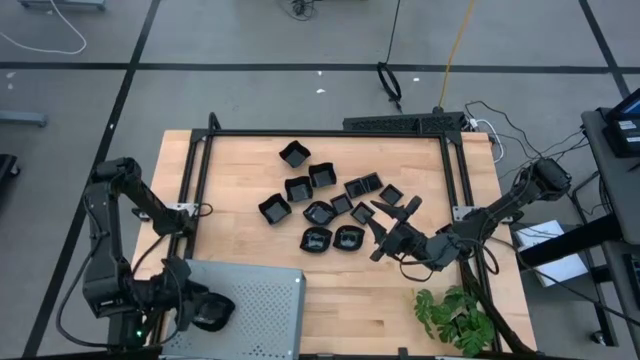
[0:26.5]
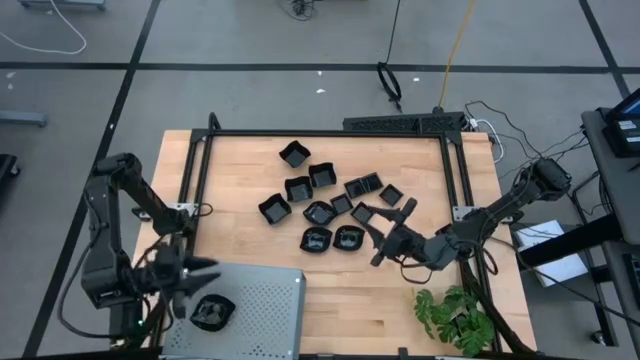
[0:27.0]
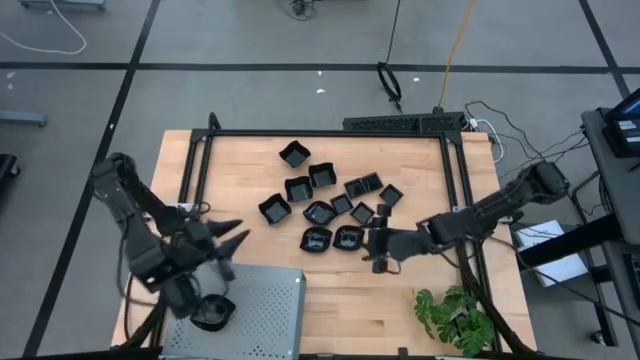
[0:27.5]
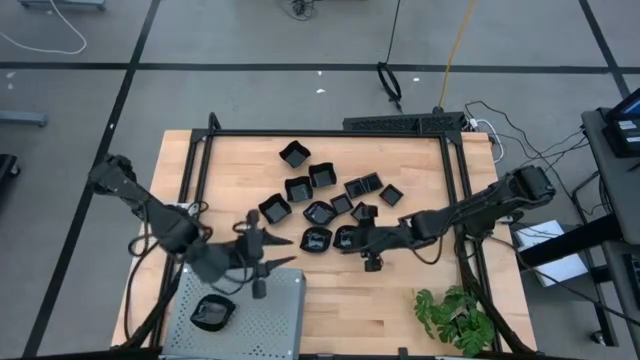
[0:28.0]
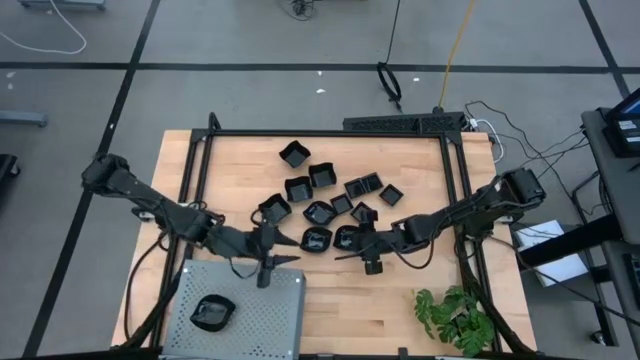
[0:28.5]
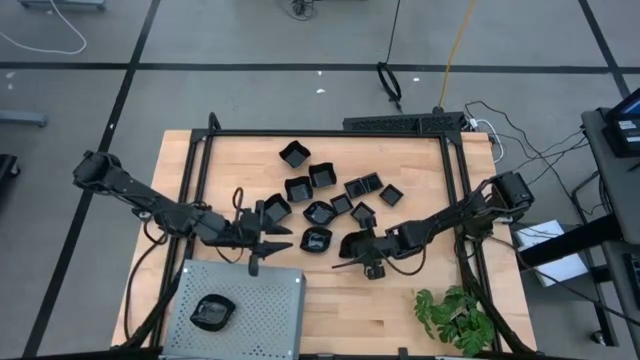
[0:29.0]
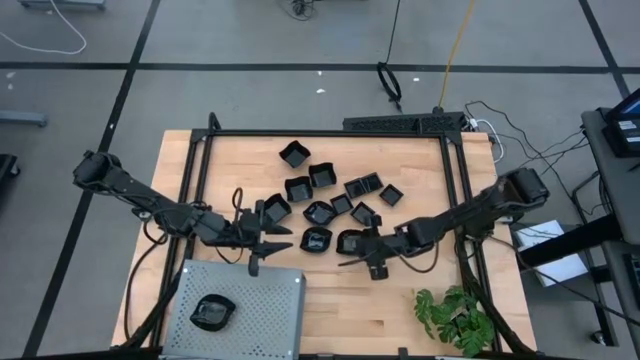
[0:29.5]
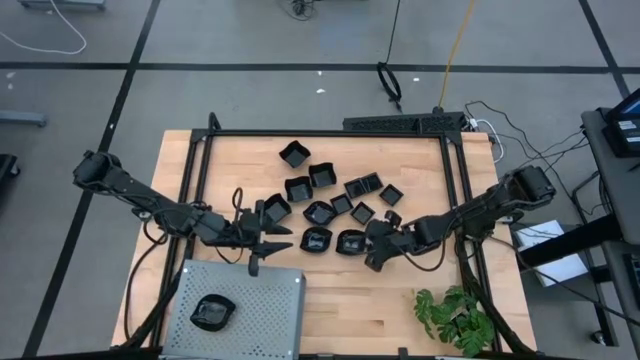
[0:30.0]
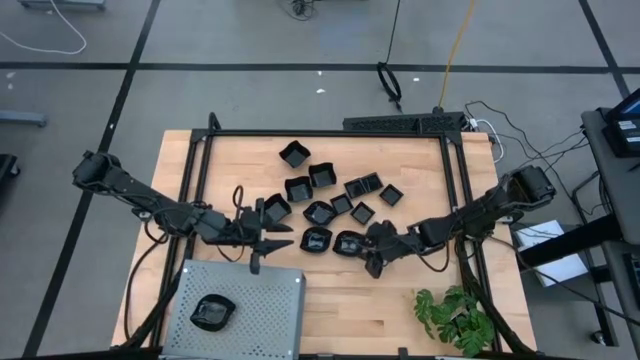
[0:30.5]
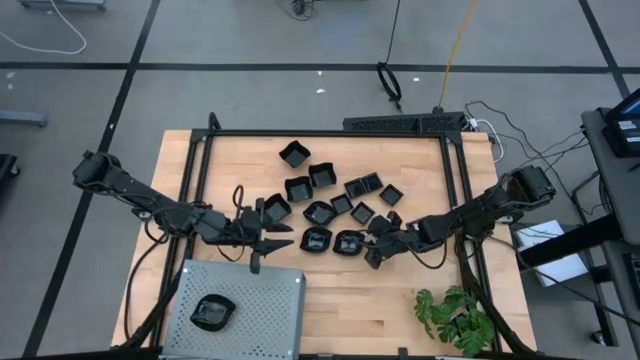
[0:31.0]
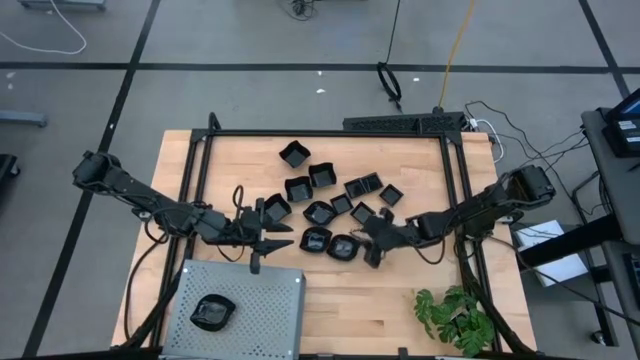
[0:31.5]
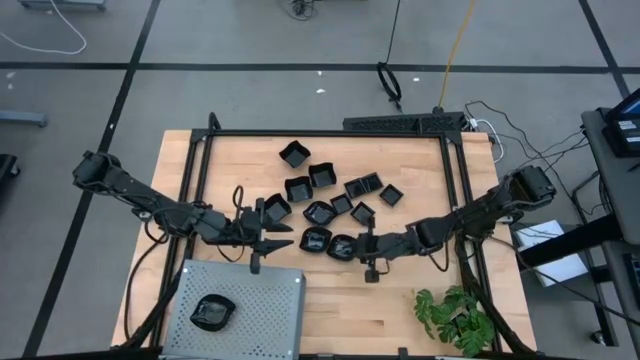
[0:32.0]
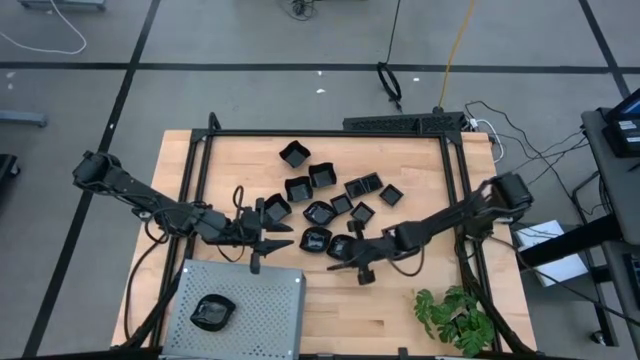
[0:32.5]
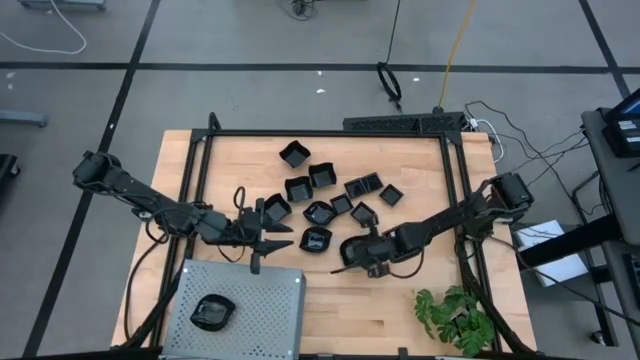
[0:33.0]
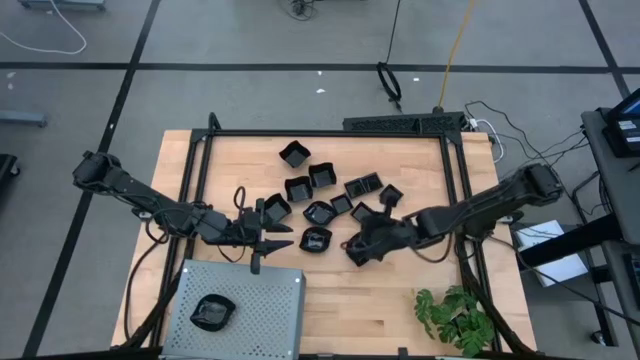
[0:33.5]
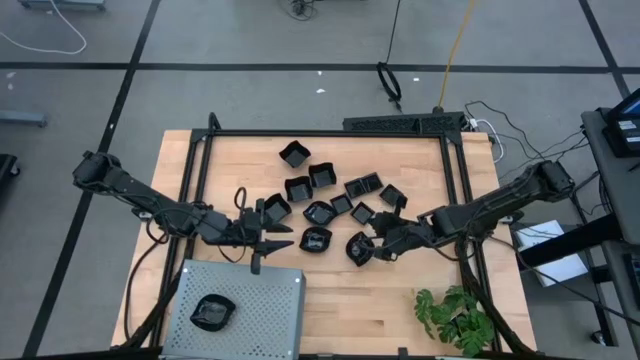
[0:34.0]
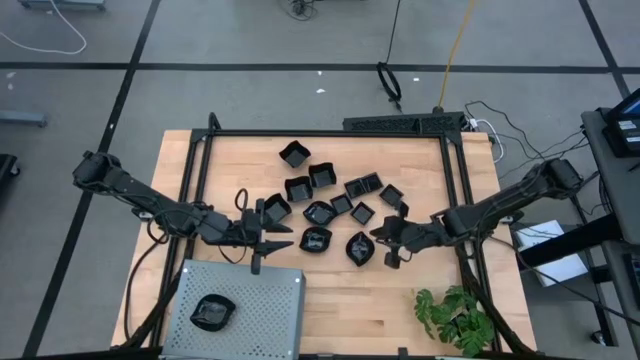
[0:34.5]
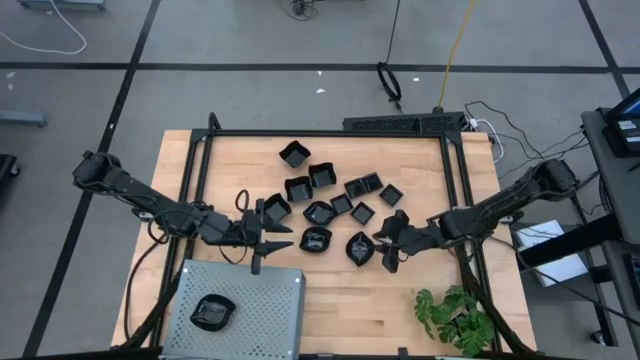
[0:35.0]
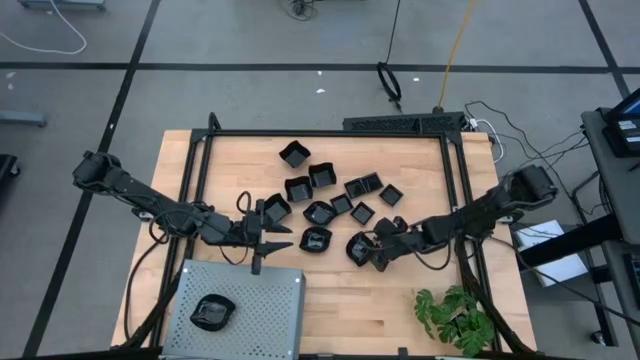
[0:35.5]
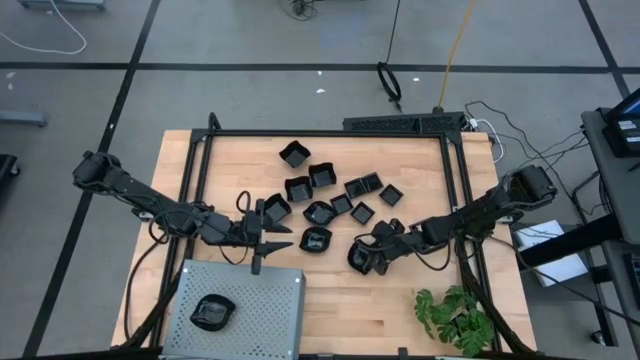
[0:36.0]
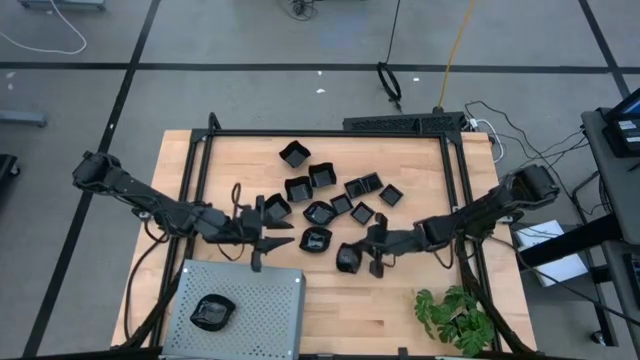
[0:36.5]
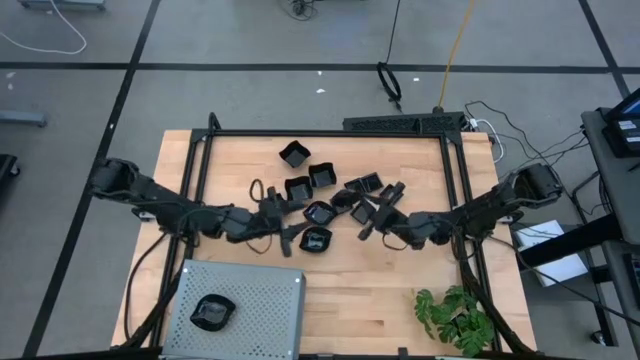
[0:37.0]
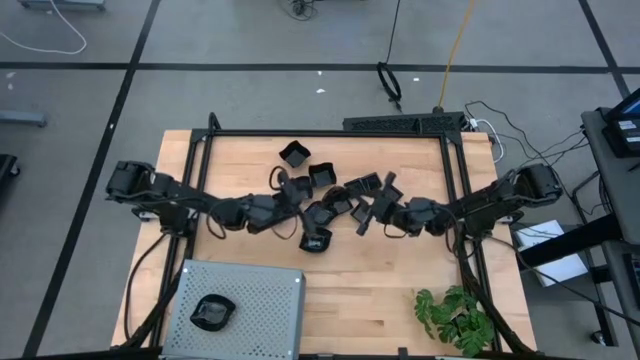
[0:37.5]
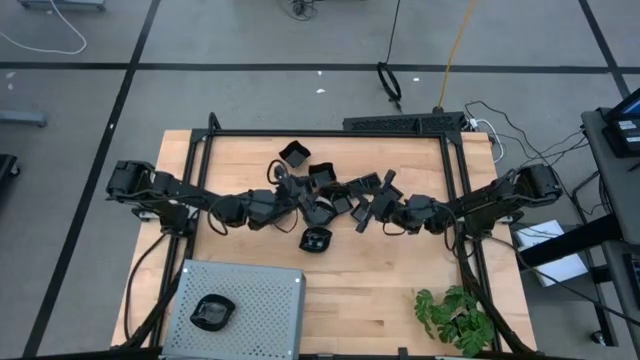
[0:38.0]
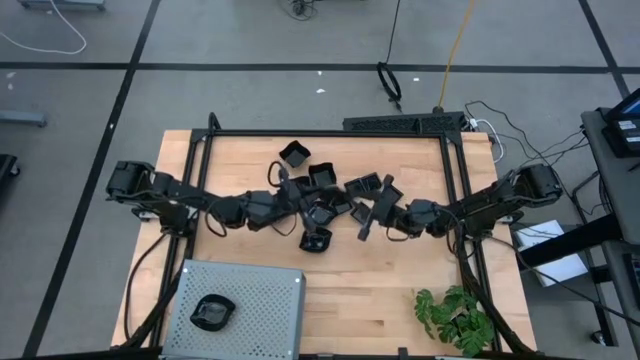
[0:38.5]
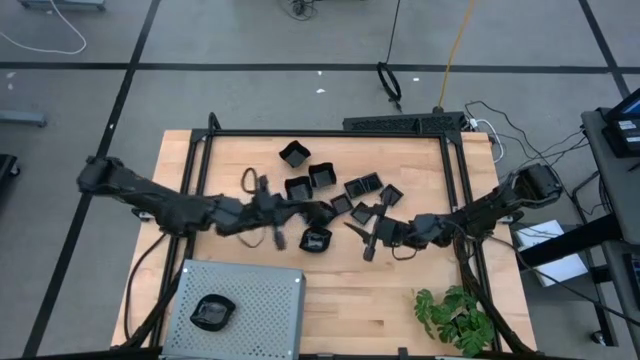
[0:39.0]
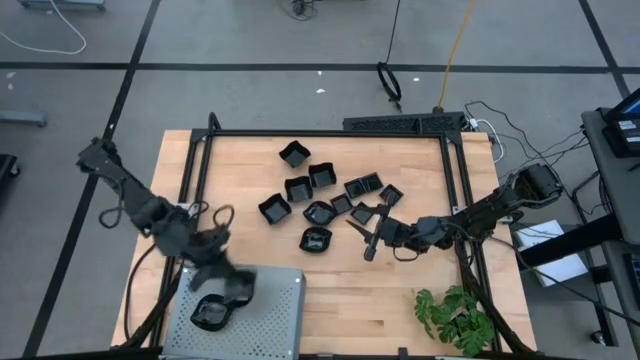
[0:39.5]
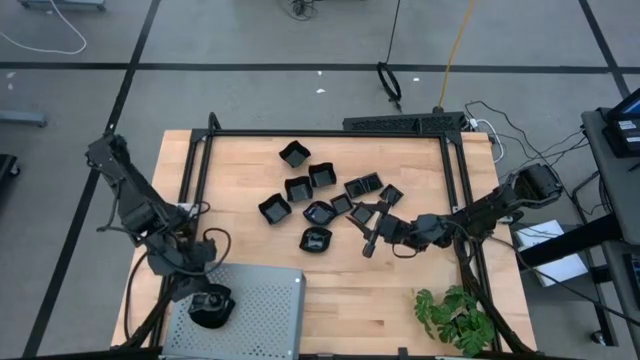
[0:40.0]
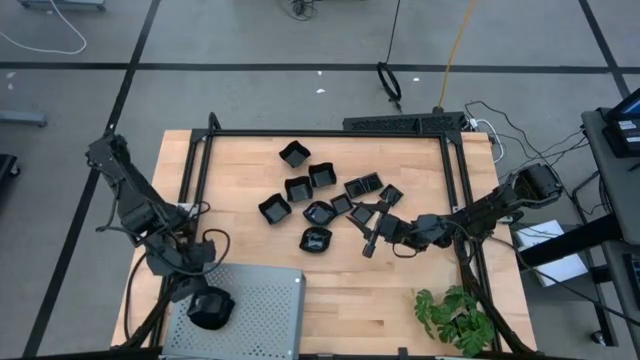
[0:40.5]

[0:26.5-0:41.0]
Task: Pick & Place Mini shaped plates
Stack the leaf-shaped plate on top of the other leaf-shaped plate on the shelf

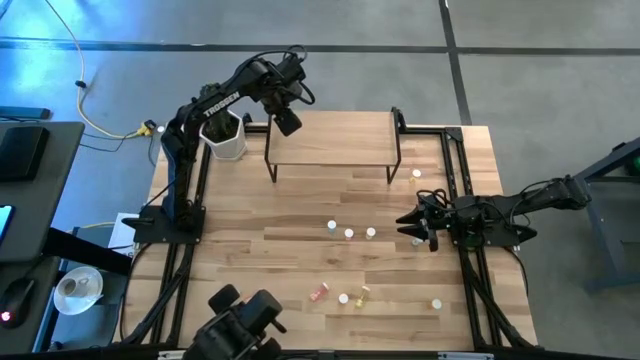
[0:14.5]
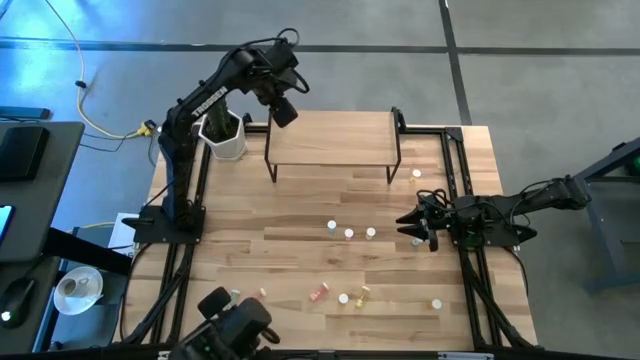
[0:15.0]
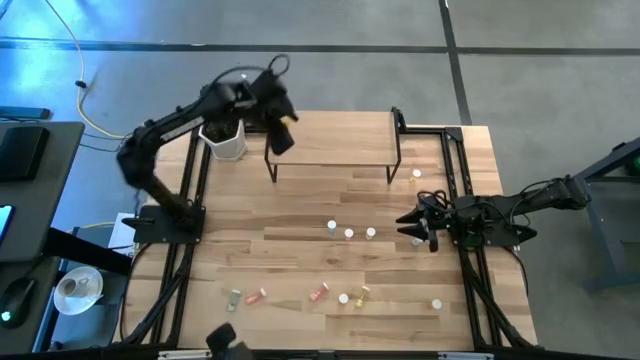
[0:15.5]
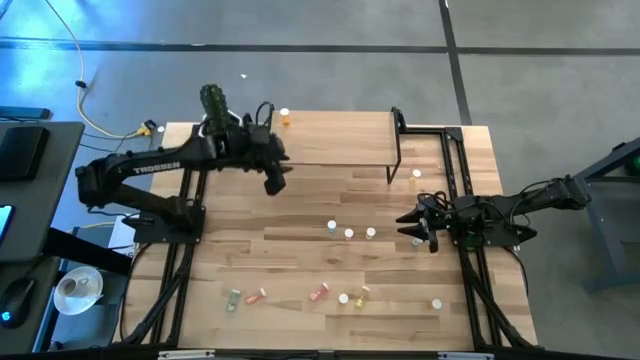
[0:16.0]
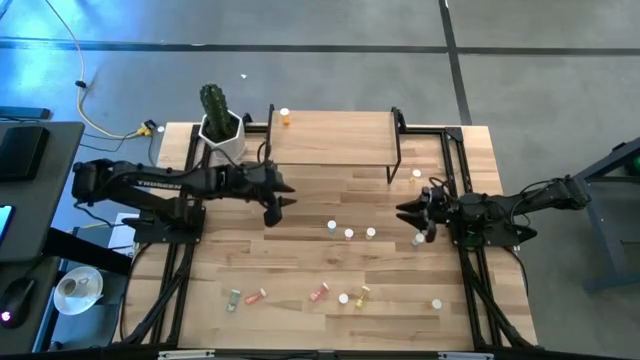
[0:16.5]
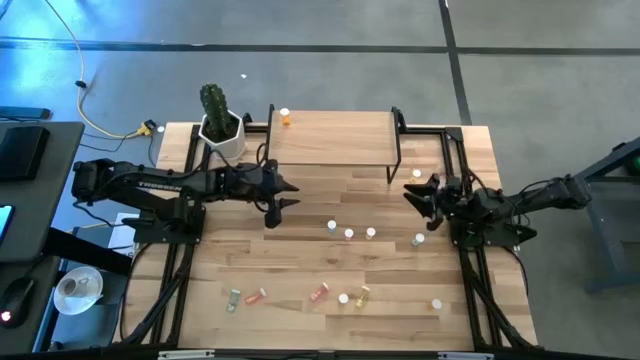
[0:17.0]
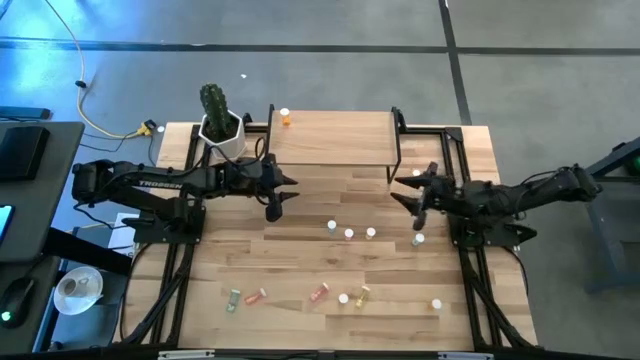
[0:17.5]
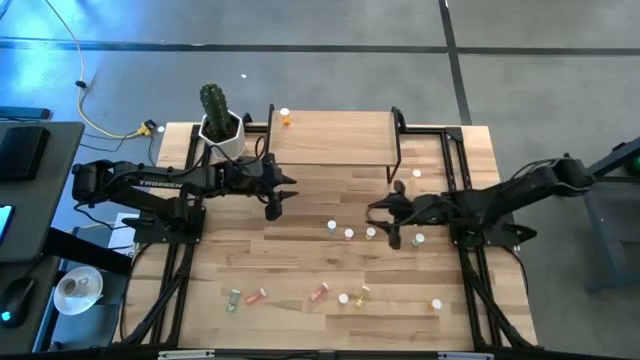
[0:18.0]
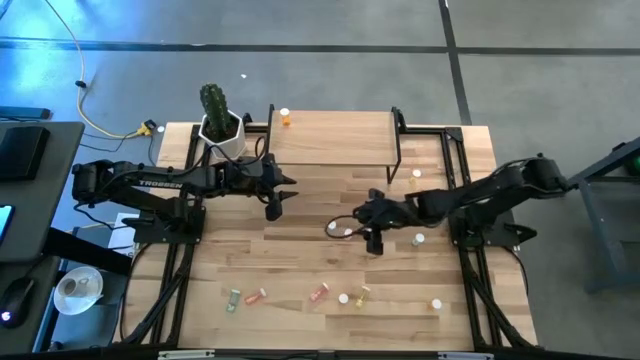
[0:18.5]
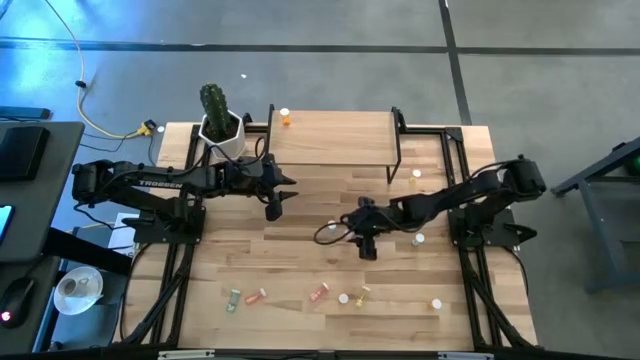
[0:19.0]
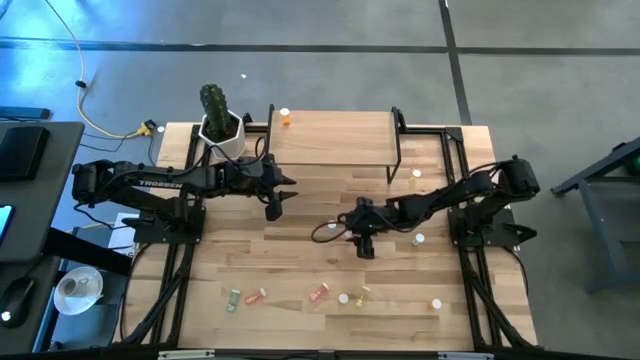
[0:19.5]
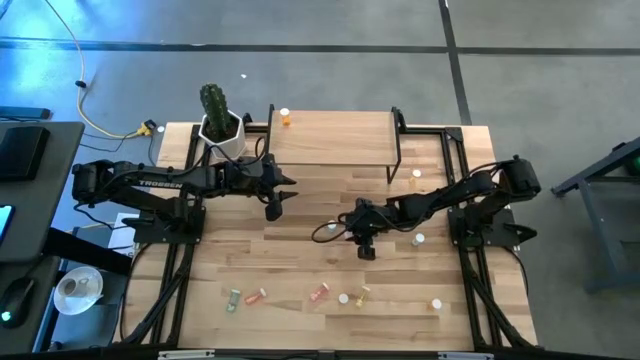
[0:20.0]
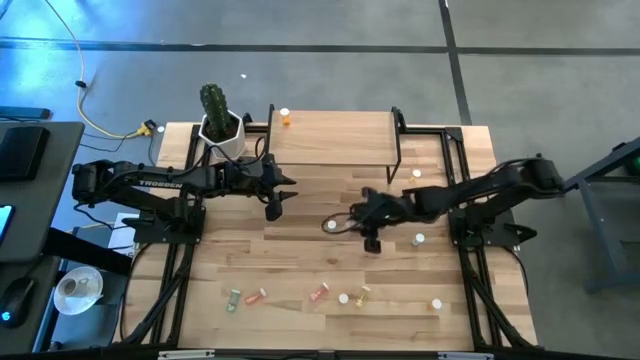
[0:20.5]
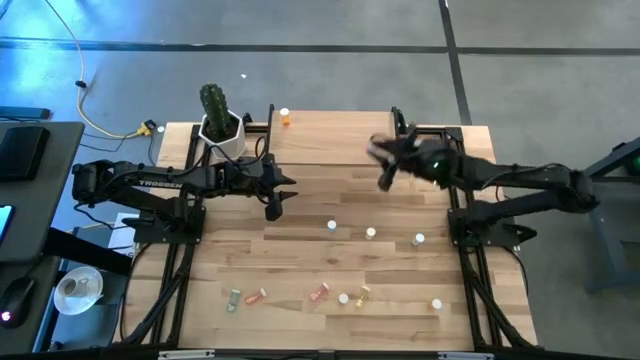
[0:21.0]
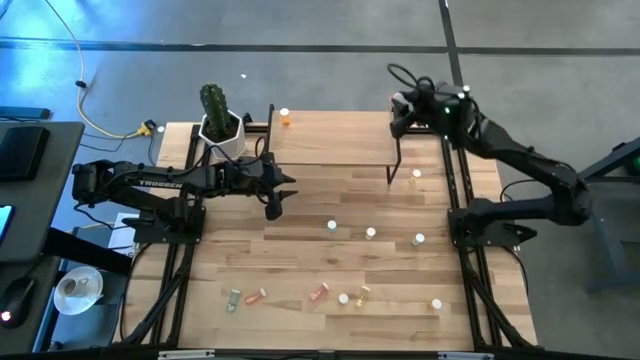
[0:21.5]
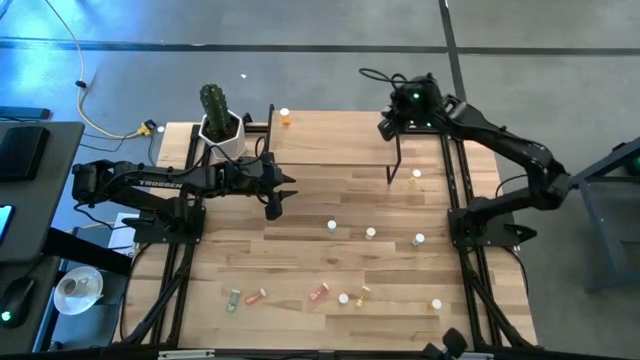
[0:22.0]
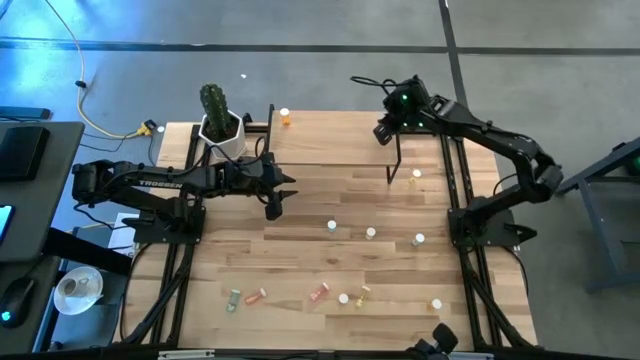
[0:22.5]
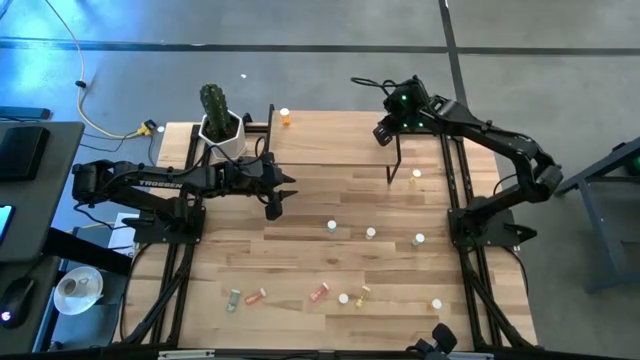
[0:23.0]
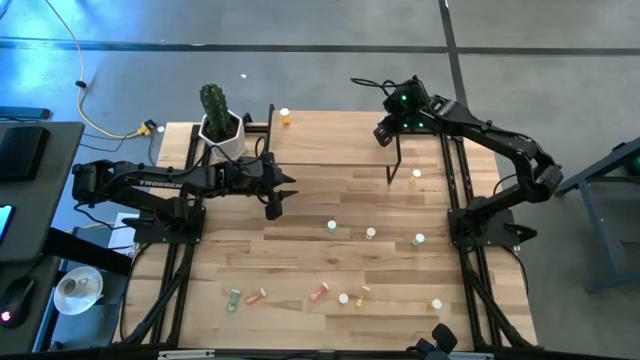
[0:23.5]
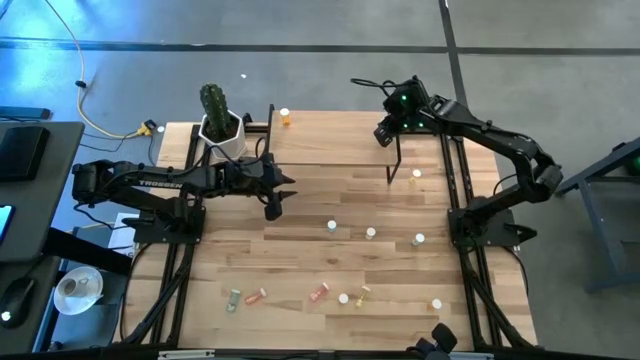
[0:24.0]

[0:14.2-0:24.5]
Task: Pick and place medicine bottles onto shelf by color
Put the top pink pill bottle on the shelf
